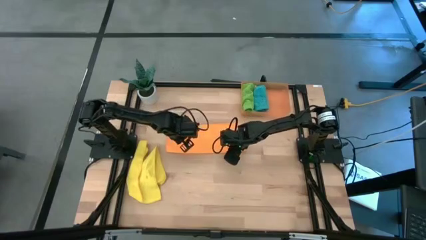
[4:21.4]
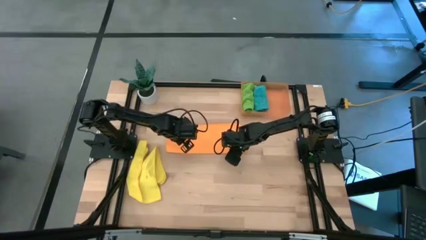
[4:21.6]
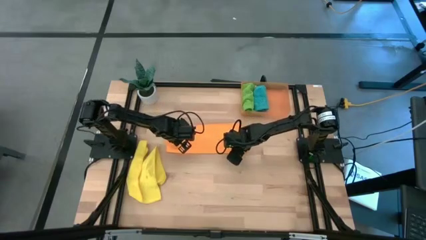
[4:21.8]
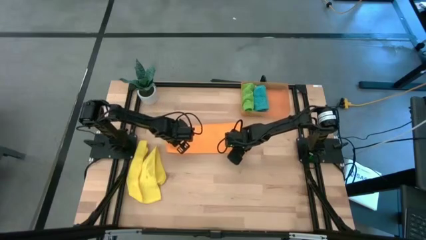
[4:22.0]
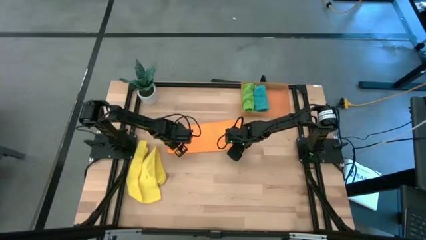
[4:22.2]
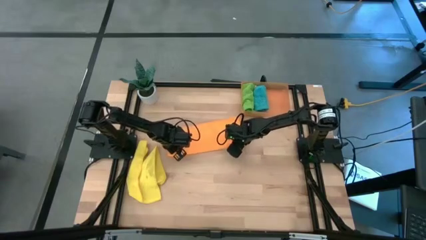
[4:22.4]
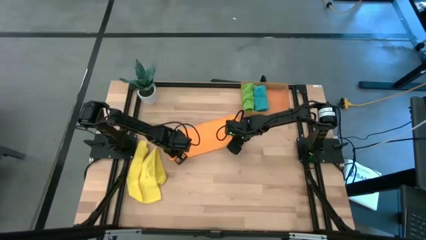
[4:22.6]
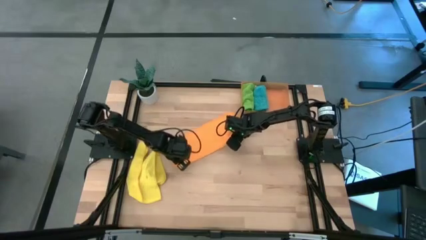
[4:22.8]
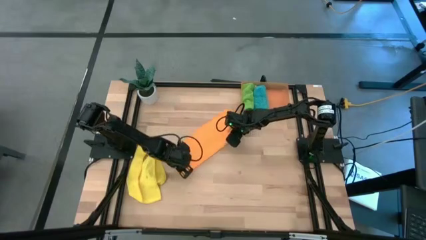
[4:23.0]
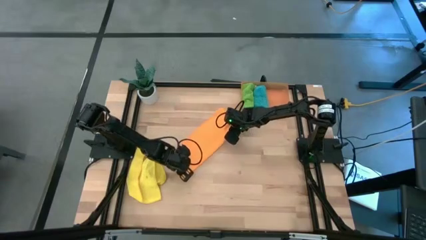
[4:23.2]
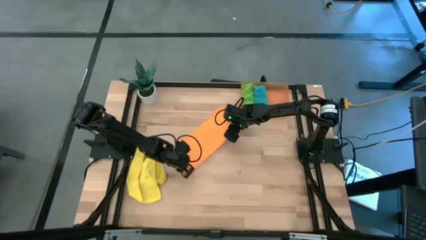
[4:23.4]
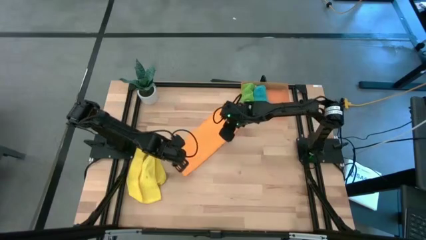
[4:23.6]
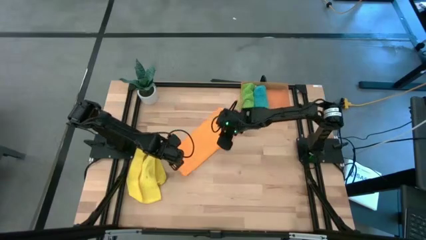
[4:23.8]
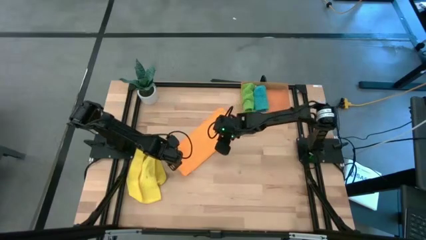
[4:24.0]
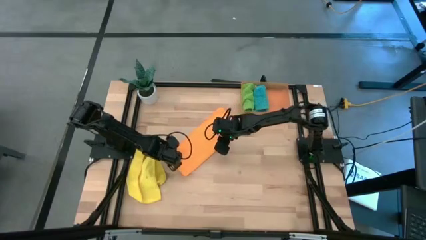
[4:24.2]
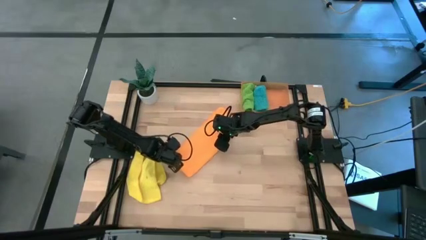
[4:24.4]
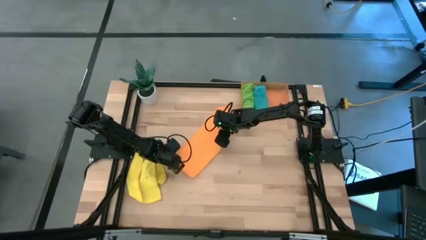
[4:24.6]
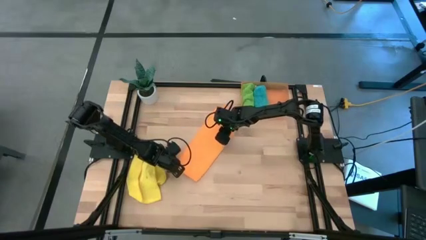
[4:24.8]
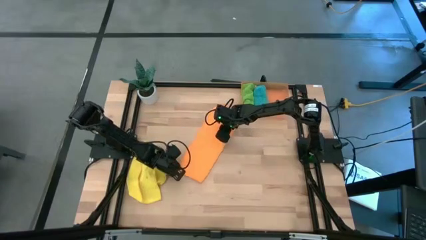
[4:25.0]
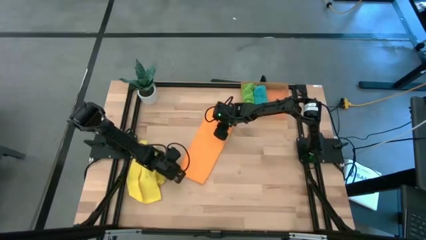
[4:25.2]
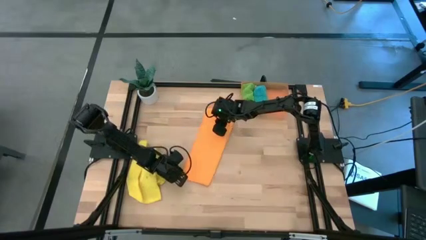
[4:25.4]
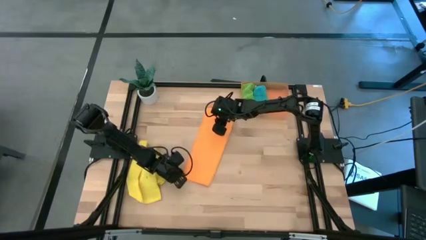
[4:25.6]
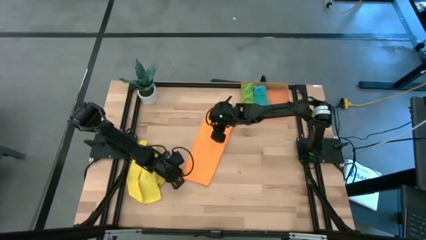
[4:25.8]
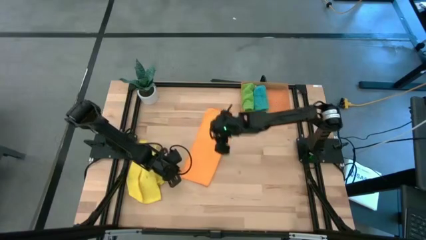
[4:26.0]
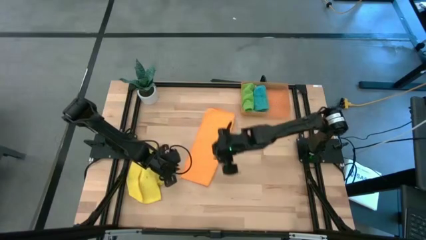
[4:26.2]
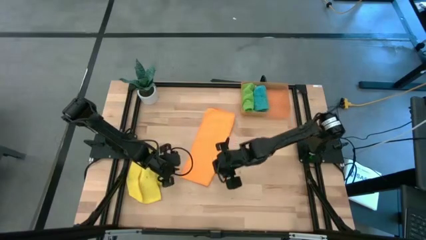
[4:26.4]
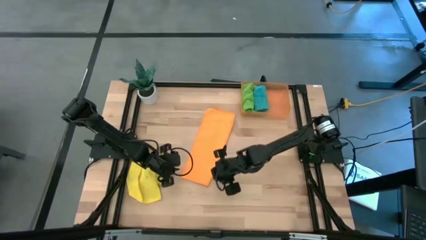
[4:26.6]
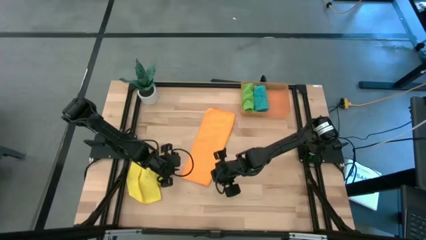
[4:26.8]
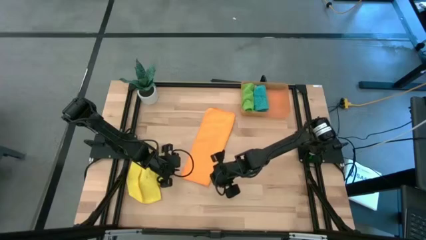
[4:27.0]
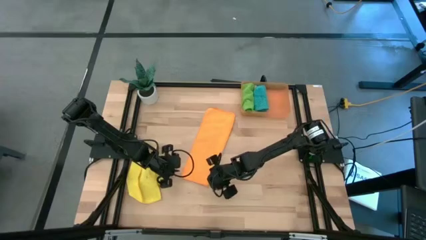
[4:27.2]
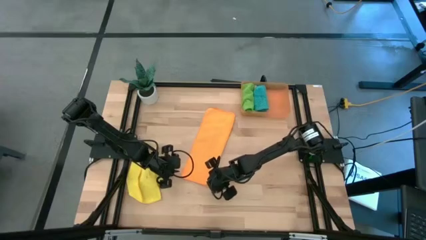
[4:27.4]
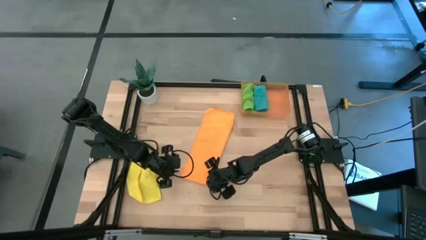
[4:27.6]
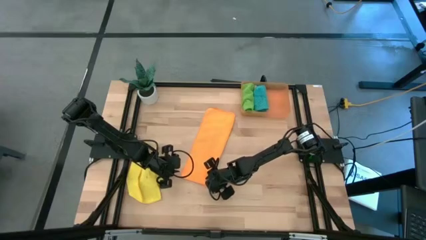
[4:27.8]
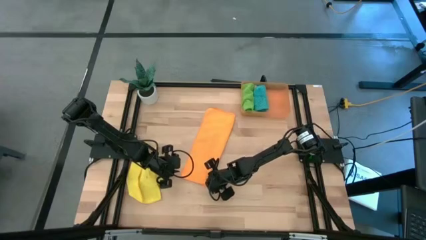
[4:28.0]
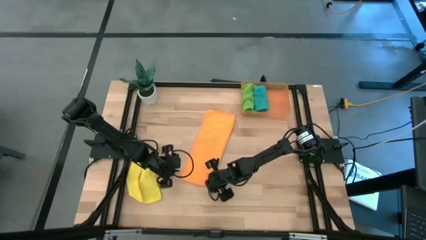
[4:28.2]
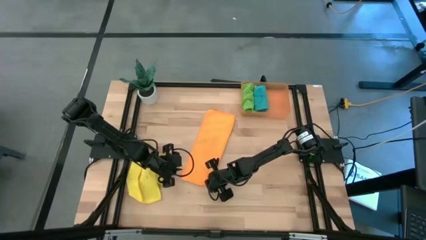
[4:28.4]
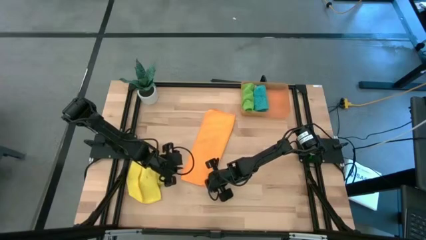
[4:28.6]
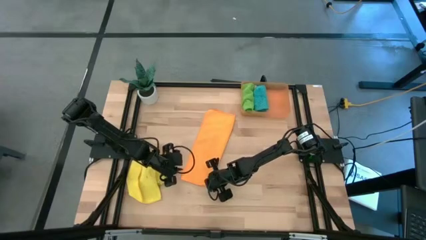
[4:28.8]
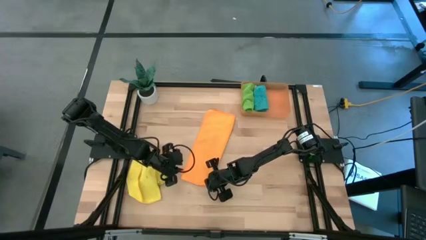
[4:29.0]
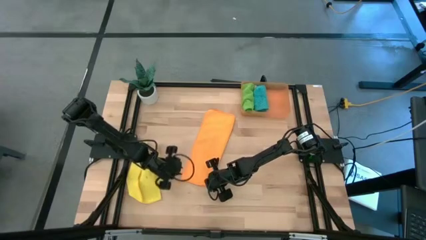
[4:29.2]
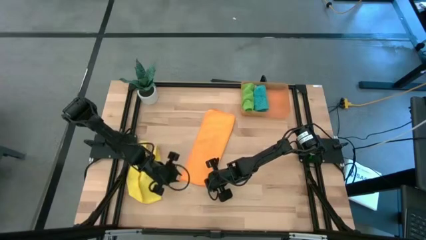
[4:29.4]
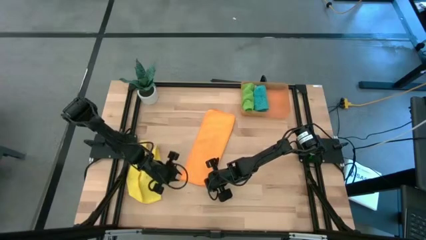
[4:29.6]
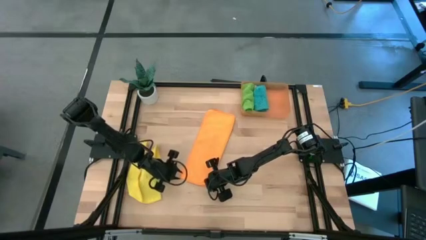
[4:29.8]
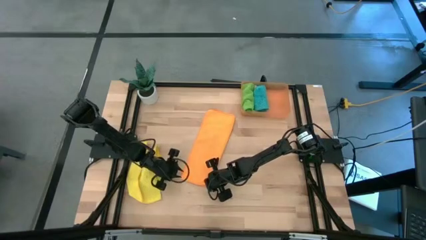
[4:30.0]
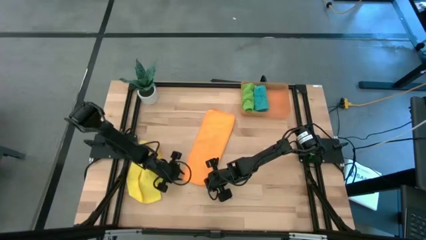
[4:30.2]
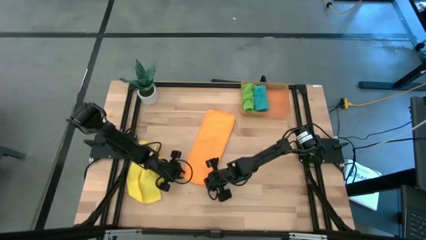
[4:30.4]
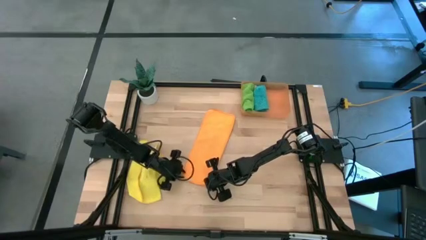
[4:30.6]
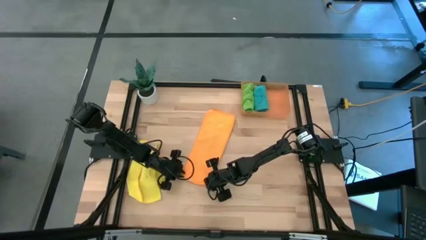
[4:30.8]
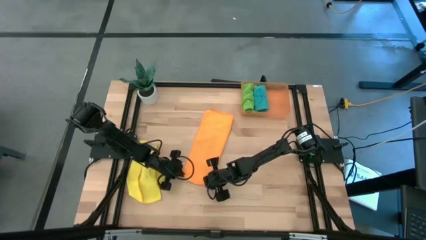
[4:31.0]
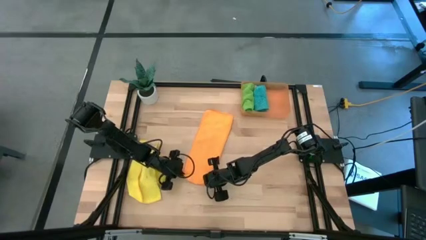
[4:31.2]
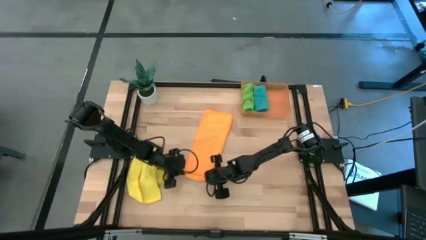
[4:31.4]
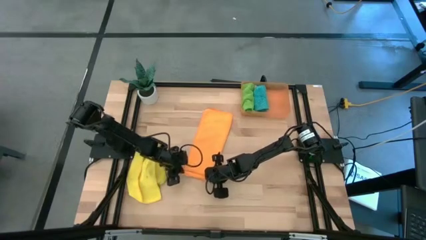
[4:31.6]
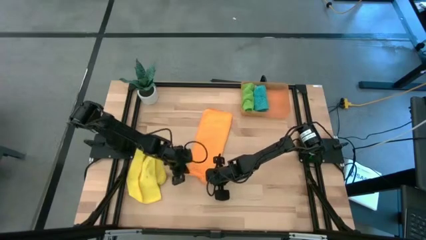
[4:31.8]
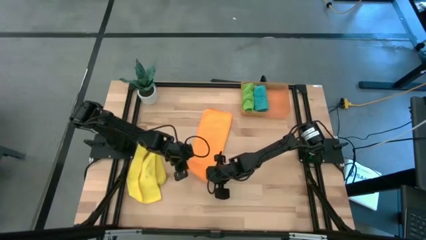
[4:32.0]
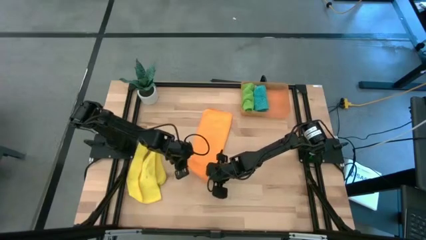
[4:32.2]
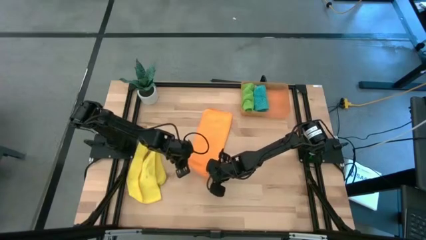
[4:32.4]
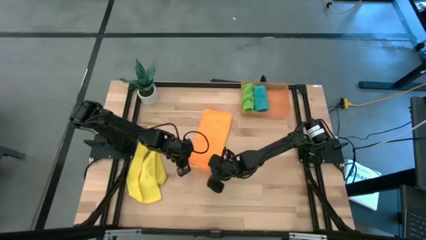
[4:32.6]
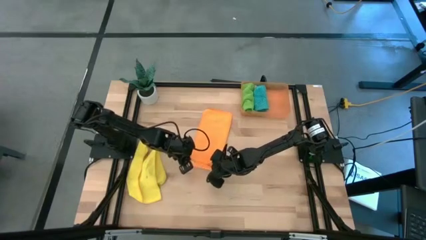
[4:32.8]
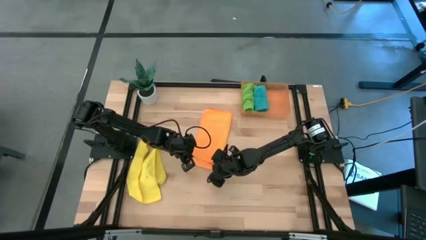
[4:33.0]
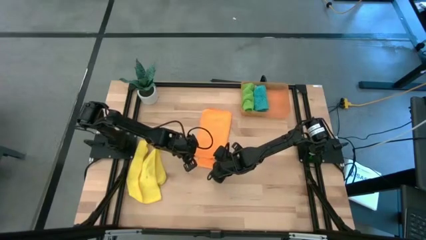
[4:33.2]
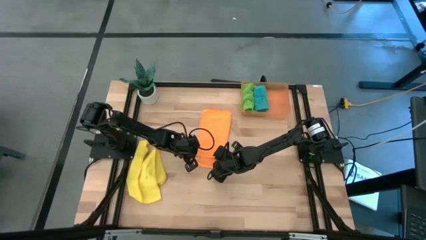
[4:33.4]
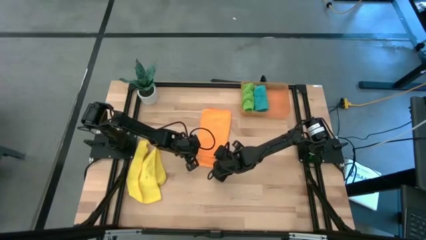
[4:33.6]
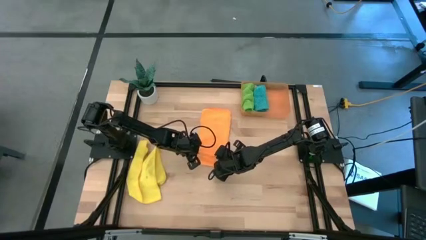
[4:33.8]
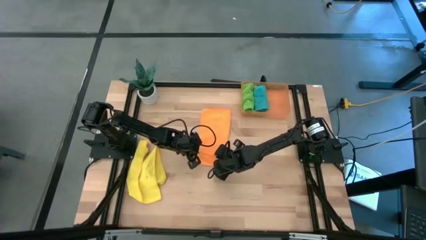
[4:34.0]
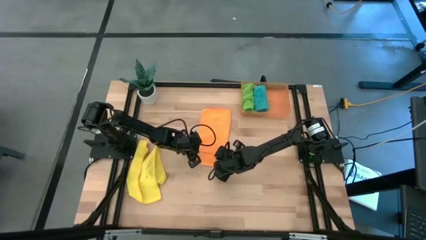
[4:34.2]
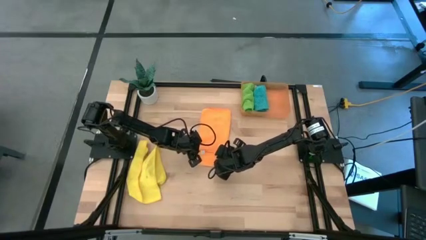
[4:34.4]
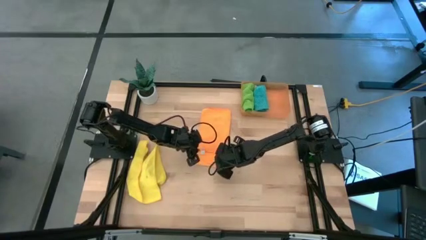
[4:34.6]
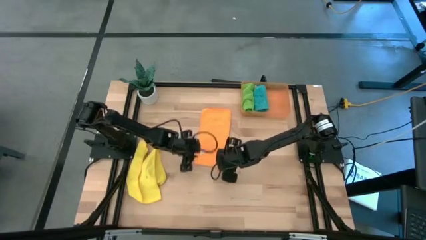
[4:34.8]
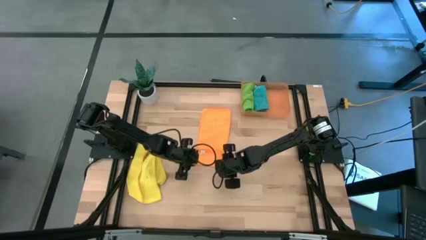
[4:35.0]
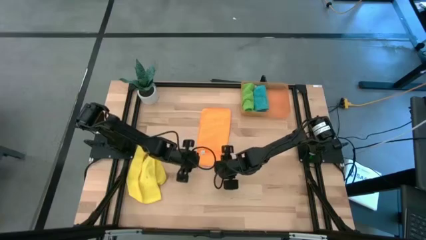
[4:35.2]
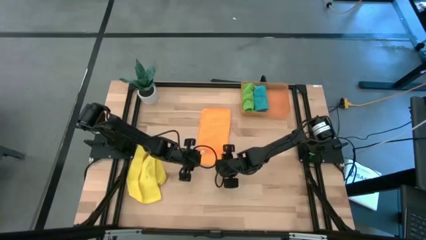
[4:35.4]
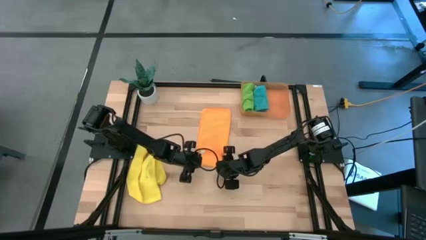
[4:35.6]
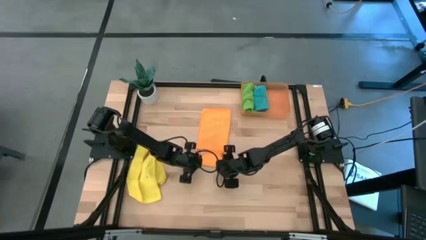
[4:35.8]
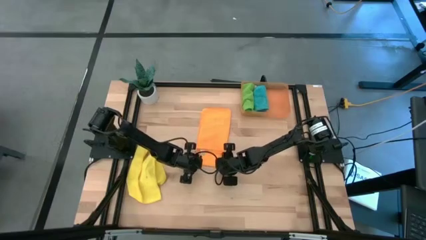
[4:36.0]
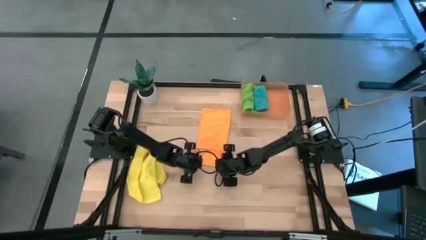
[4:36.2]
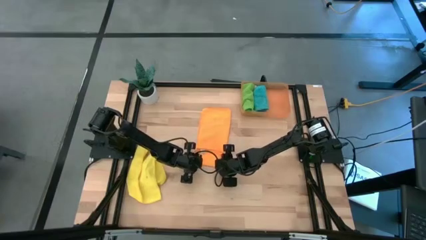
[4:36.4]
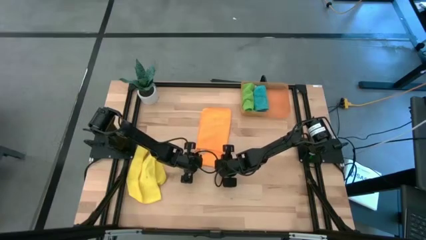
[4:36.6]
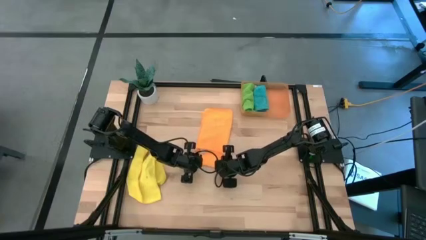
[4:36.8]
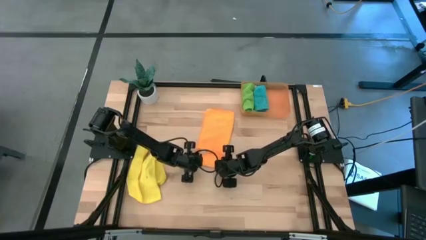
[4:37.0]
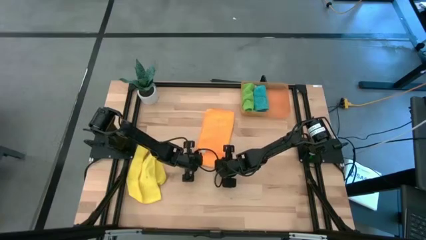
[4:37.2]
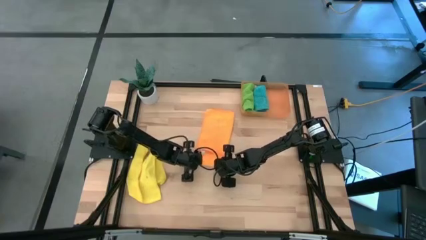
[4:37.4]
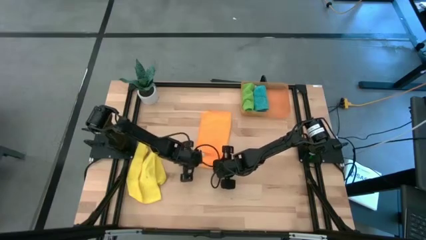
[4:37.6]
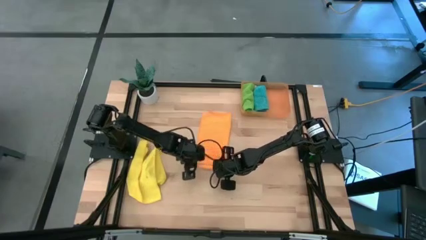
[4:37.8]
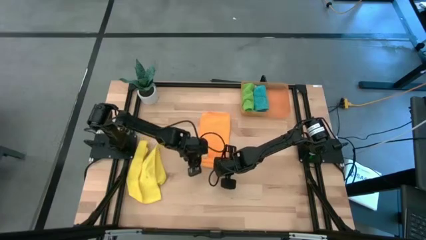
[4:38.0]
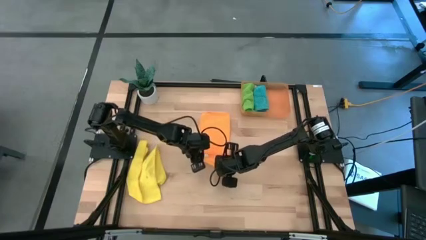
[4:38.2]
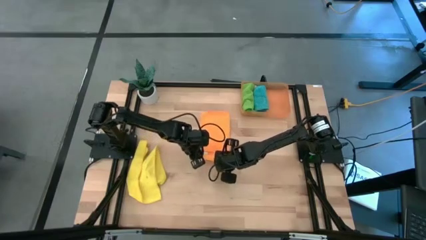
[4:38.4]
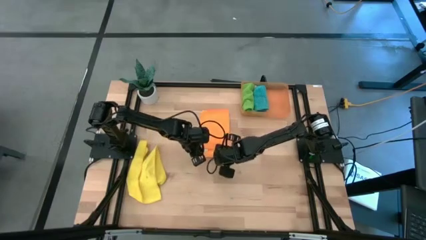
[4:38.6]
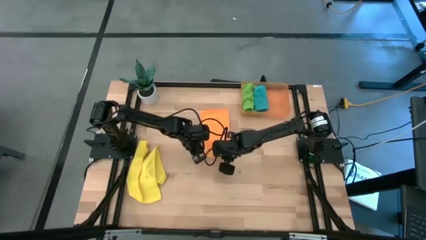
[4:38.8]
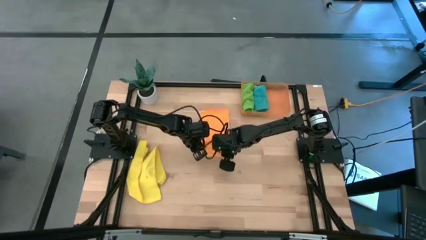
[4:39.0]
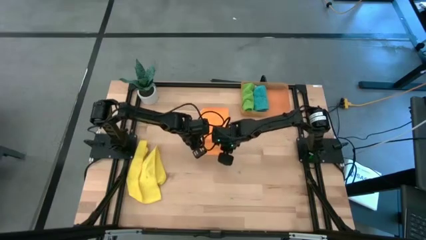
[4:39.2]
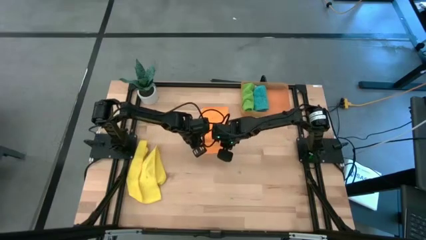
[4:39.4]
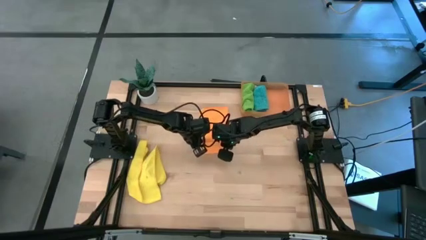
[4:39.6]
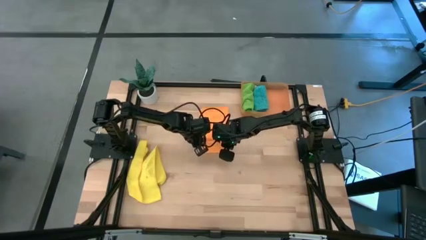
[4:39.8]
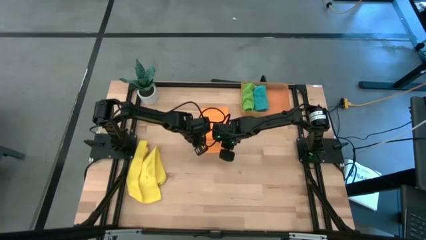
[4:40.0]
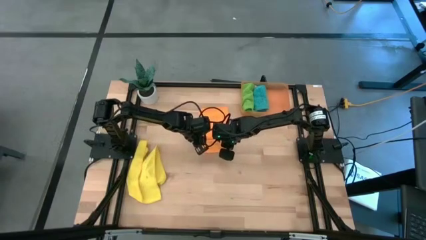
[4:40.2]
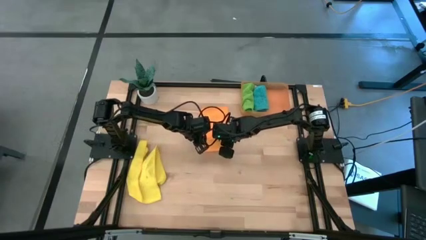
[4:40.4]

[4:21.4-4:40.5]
Task: Roll microfiber towels into tight, uniform cylinder then place into a basket
Fold the orange towel
